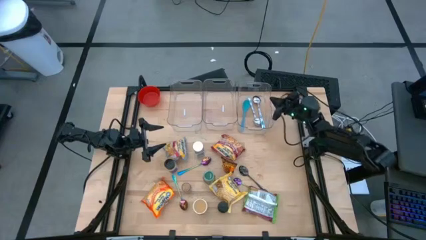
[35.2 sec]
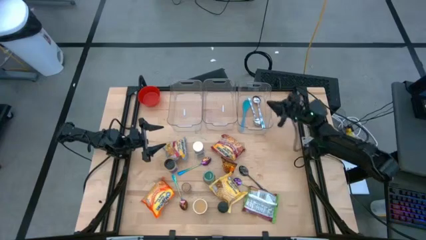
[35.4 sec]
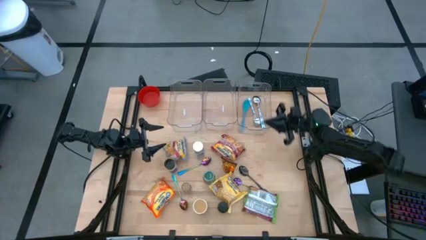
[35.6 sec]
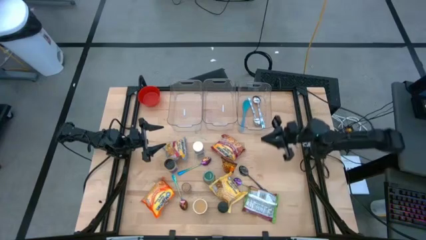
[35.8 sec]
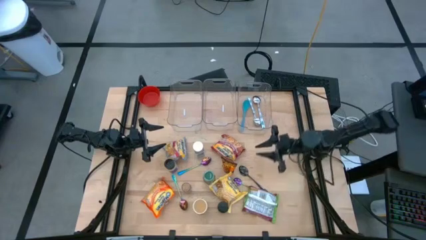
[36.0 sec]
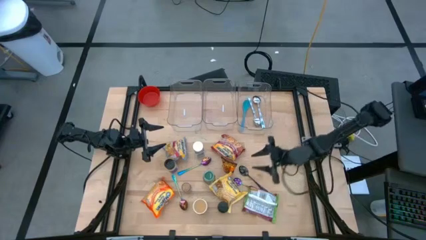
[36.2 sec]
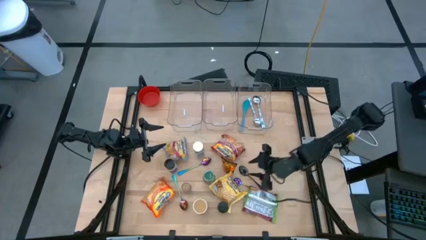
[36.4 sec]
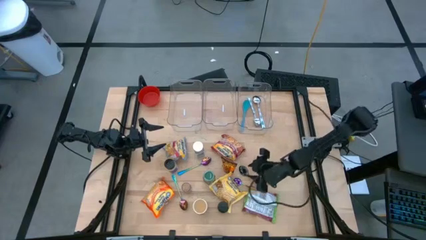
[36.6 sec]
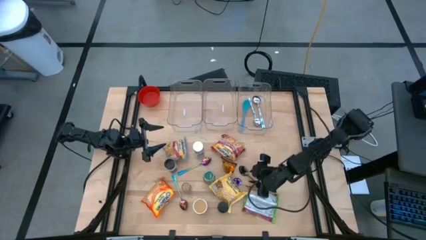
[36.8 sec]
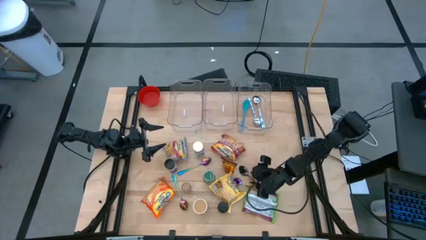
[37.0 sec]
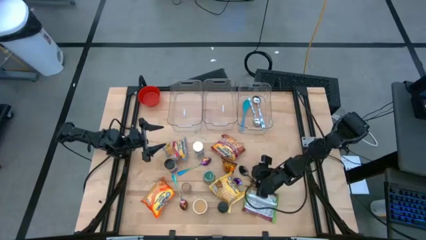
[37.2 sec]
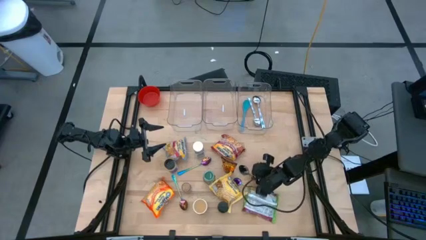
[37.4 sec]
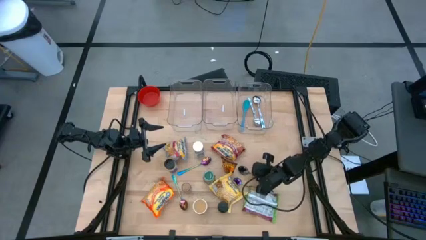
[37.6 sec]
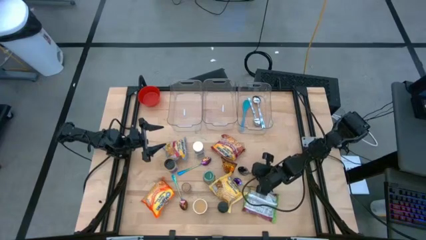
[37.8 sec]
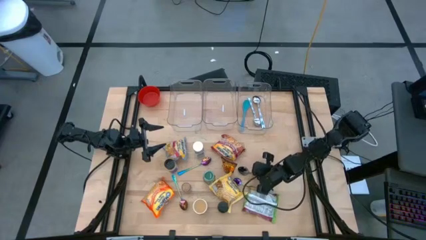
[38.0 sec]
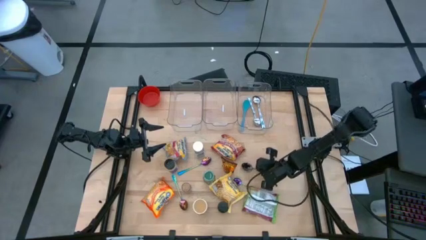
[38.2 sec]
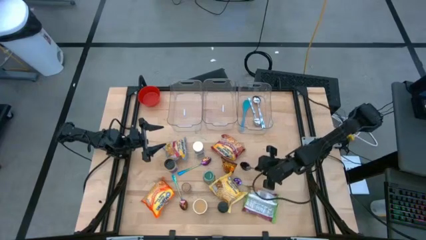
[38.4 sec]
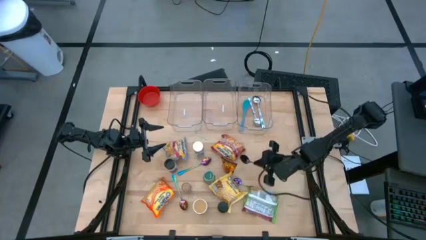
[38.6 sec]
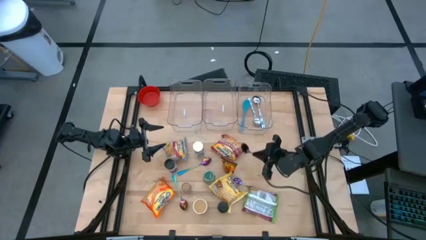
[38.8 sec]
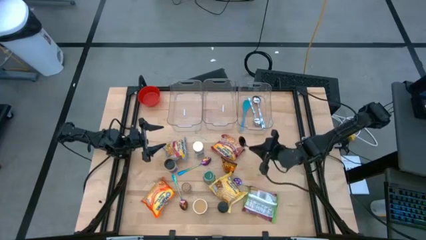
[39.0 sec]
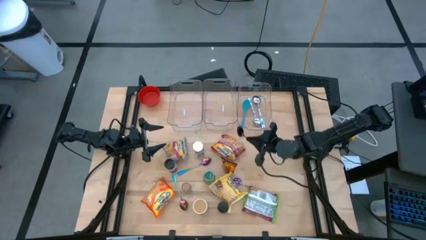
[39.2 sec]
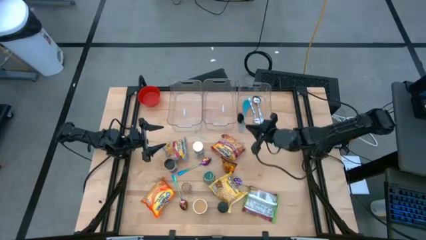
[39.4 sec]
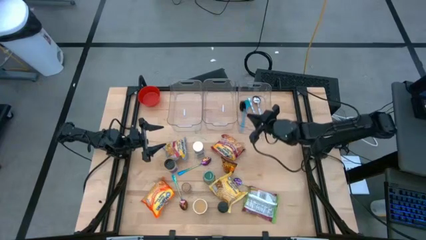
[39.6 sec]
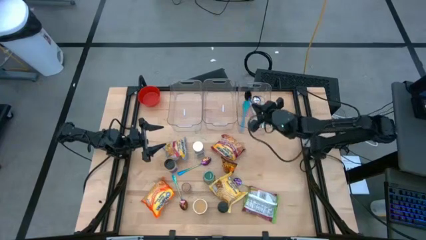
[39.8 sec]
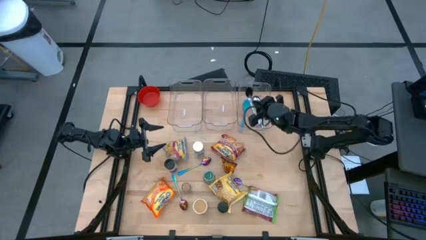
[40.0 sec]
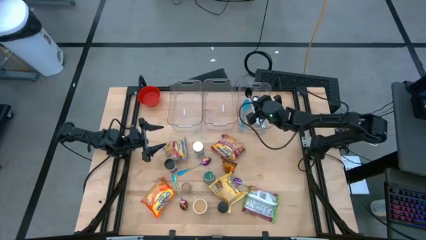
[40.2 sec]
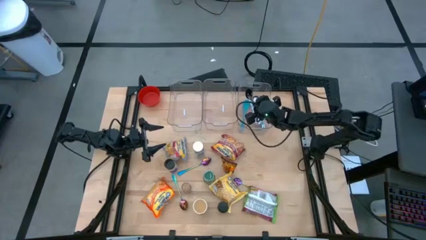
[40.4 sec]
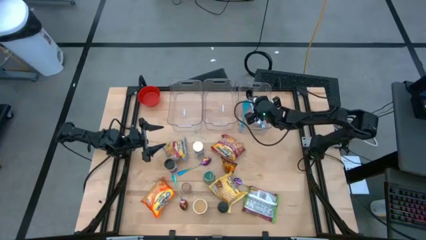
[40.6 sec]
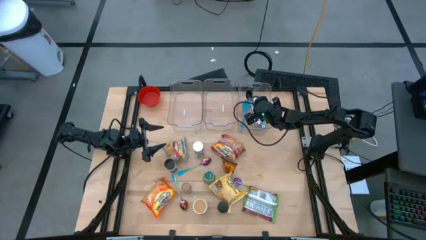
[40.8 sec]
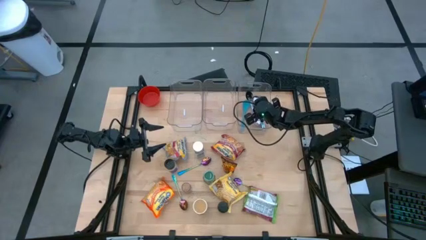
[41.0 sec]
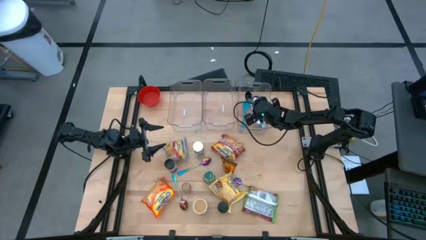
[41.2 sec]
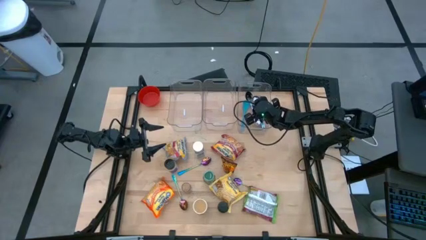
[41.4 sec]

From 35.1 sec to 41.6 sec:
Task: Pick & Place Food Item
Put the black spoon into the right transparent bin

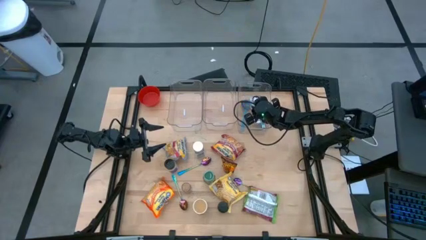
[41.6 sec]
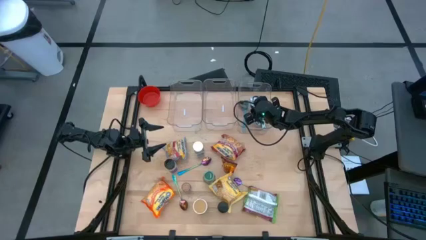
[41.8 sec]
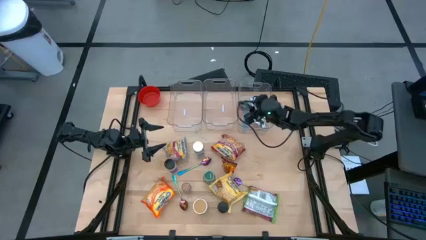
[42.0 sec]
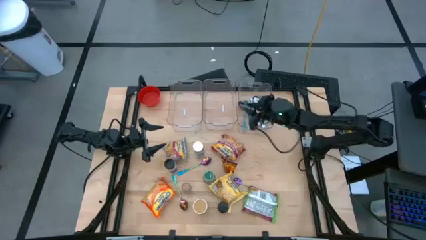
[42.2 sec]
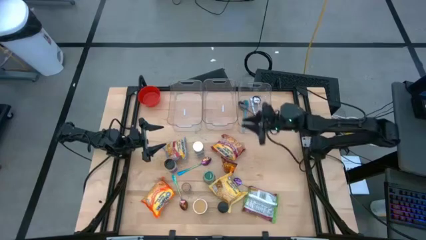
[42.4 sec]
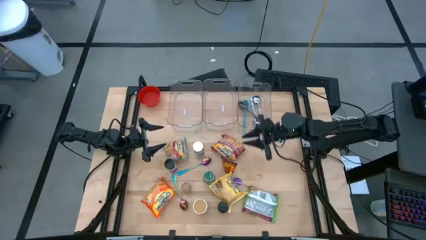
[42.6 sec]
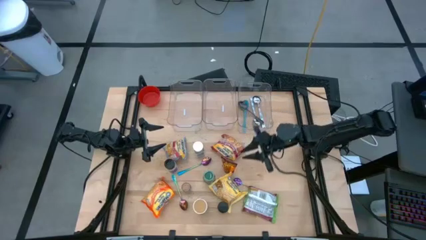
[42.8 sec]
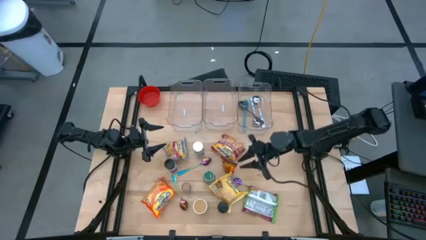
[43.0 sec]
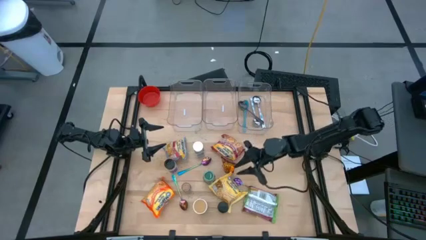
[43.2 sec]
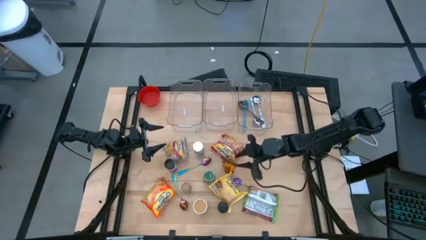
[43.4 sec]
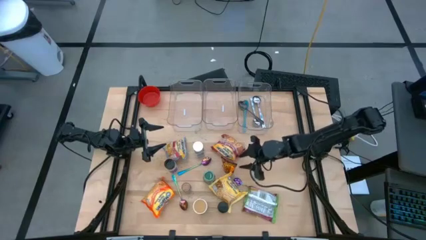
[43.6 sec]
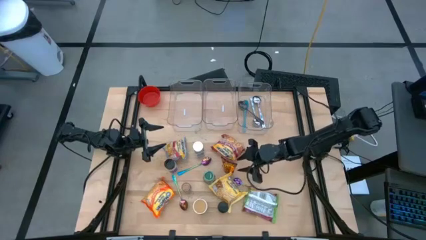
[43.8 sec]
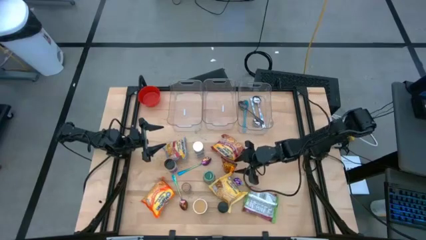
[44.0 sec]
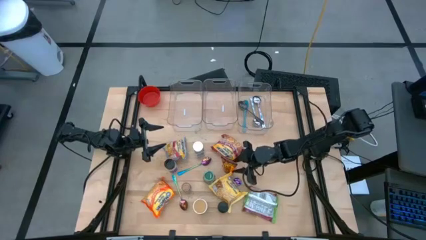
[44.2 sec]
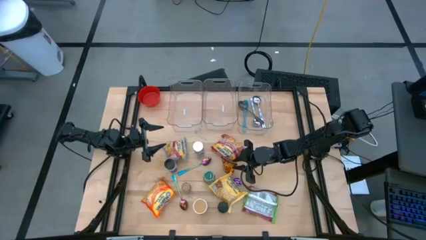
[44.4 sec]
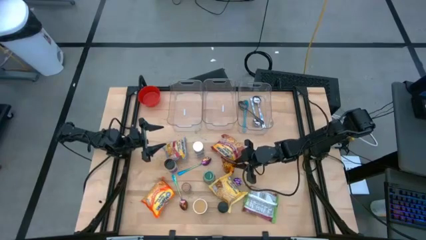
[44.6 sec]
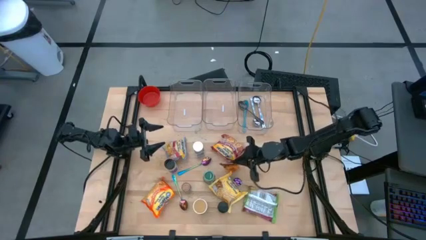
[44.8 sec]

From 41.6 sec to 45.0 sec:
Put the orange seasoning pack into the left transparent bin

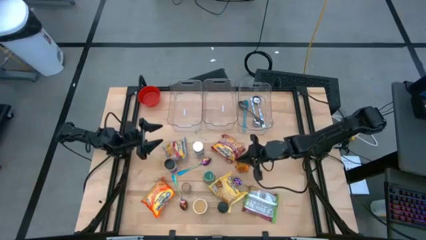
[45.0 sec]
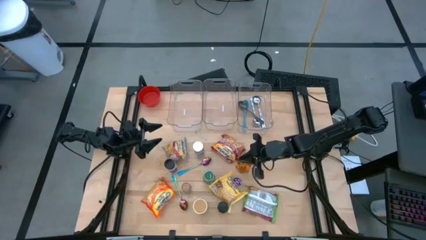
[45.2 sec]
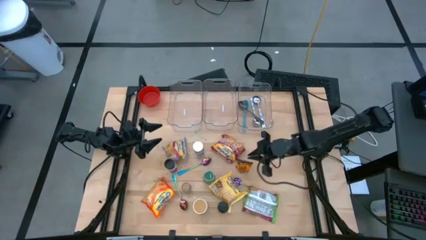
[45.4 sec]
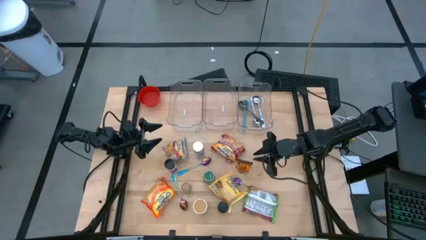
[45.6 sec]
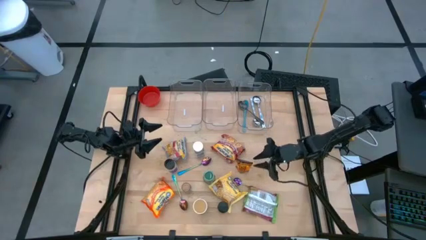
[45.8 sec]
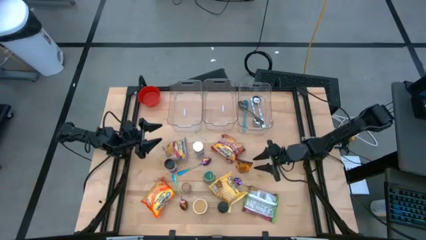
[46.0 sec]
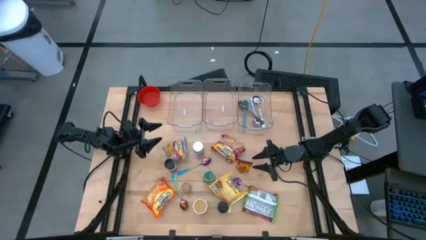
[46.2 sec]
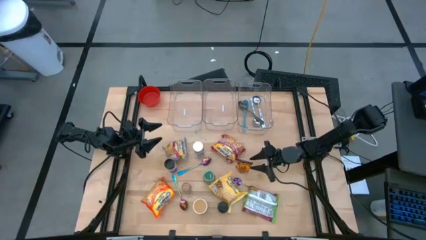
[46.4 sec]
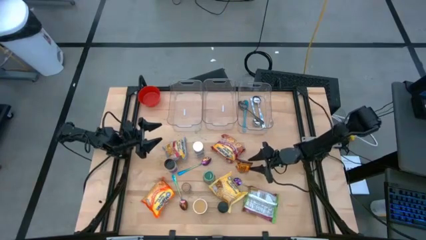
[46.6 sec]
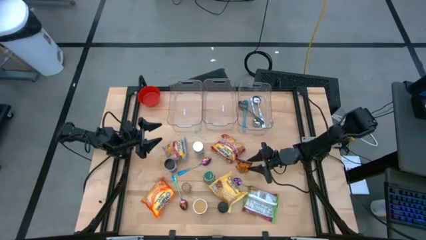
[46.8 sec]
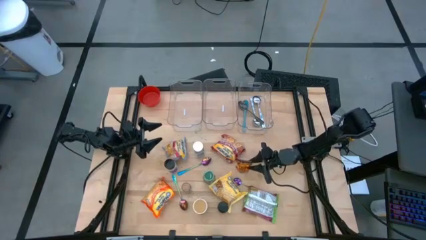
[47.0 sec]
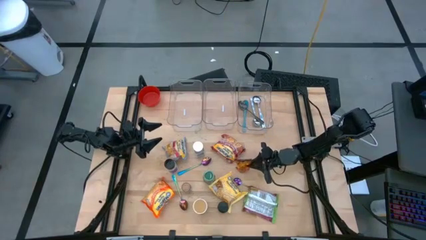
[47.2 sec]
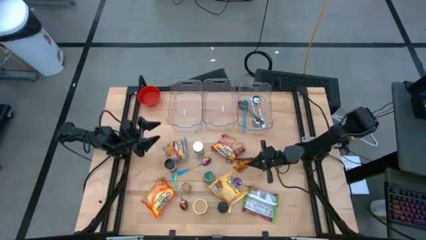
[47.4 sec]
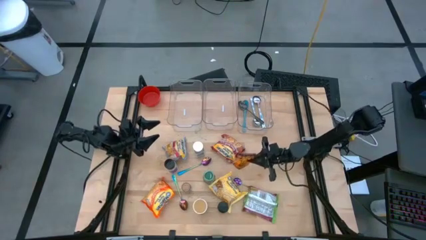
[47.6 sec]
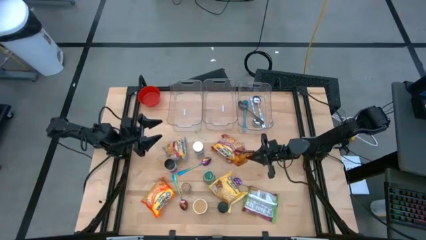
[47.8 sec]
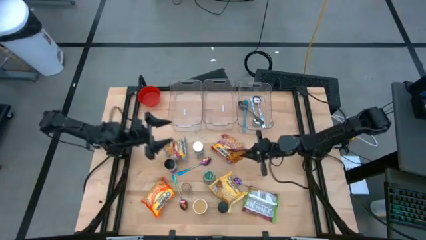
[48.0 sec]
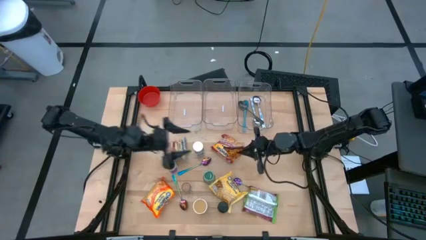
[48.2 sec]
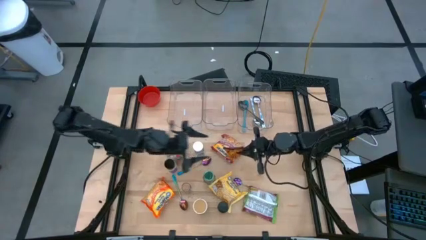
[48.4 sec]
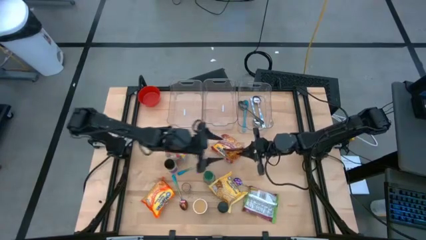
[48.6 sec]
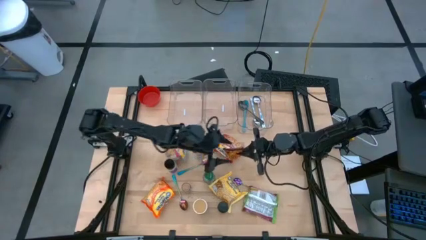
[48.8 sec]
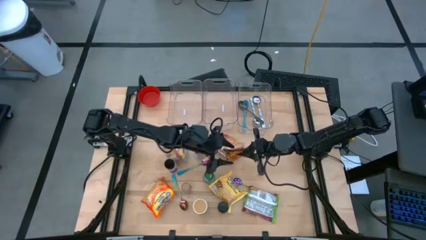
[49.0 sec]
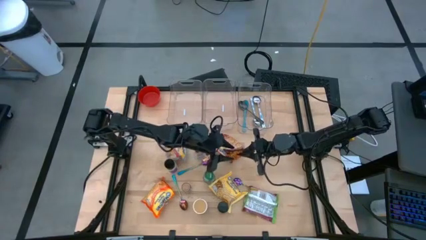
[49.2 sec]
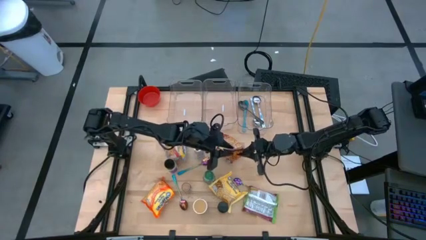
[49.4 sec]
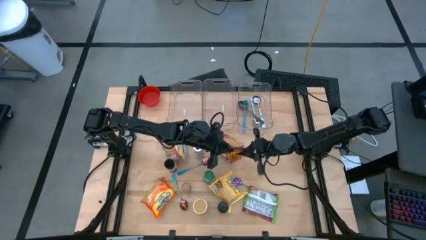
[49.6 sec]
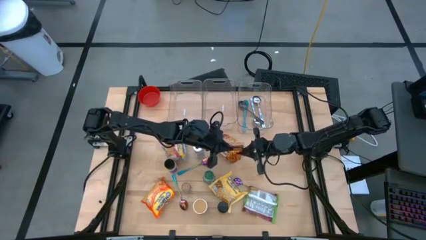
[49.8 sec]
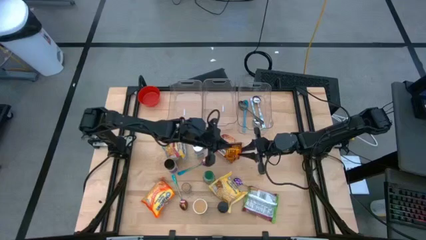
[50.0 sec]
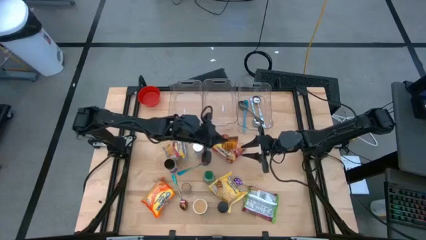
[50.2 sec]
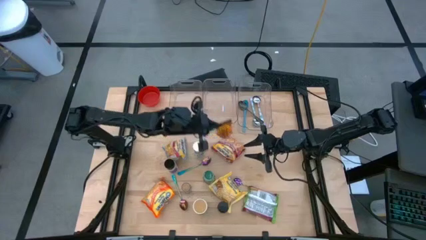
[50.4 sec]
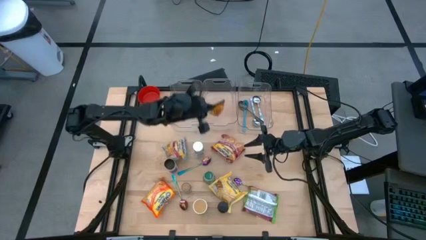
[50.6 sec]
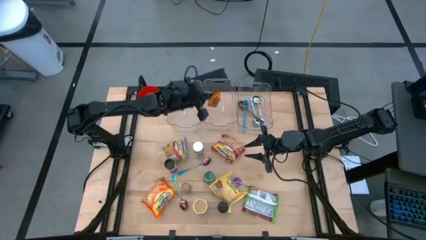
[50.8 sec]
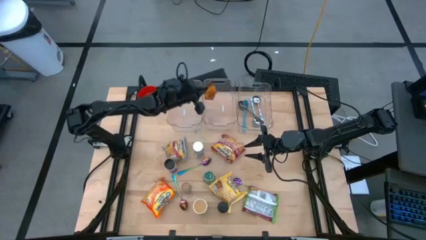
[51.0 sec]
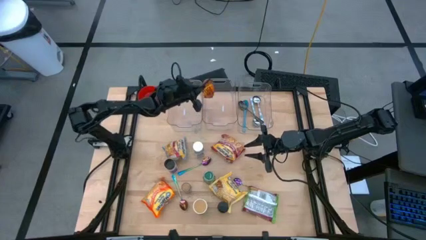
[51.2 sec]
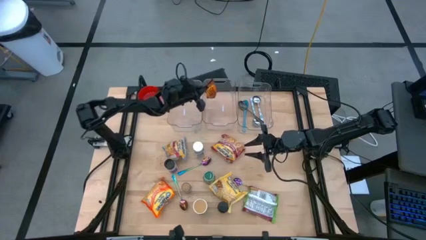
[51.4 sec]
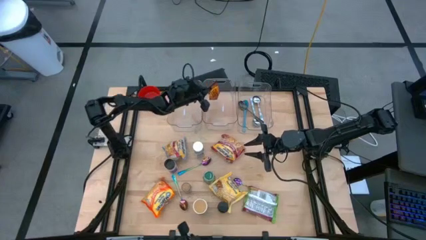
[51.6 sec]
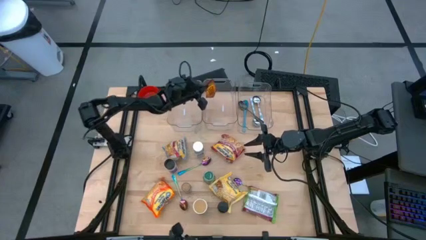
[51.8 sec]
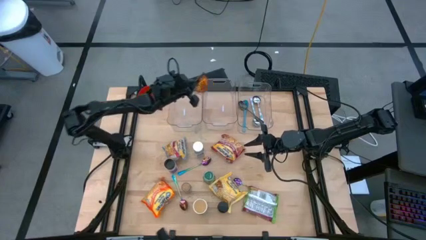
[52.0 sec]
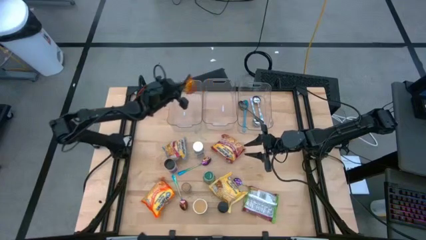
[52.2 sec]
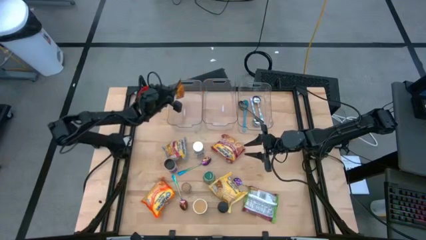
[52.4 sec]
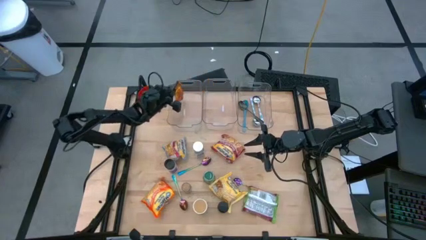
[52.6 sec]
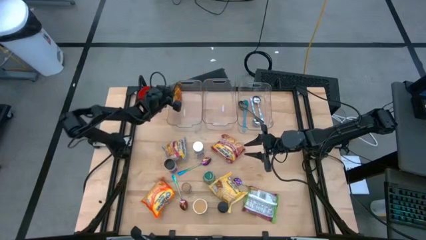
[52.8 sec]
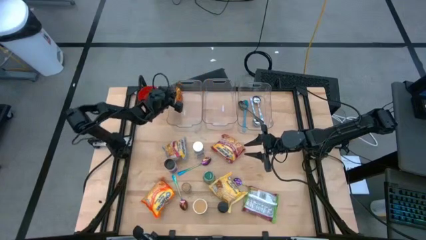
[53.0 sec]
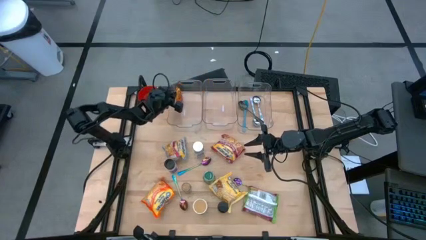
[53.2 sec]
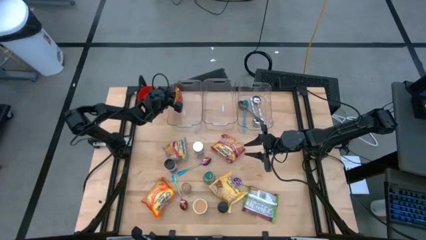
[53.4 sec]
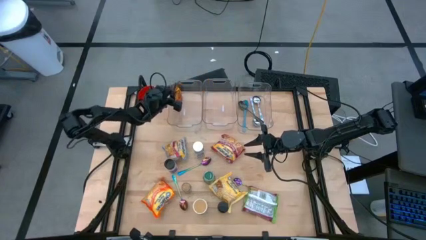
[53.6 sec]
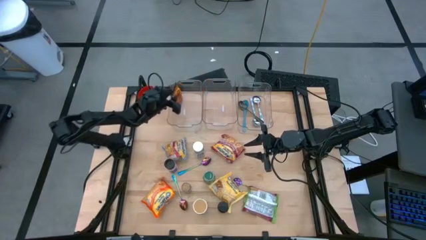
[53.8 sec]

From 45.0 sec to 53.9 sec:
Put the orange seasoning pack into the left transparent bin
